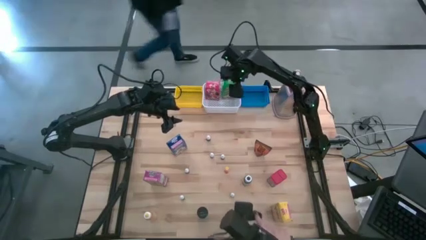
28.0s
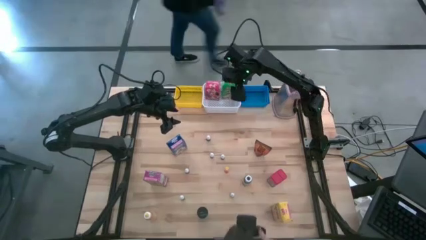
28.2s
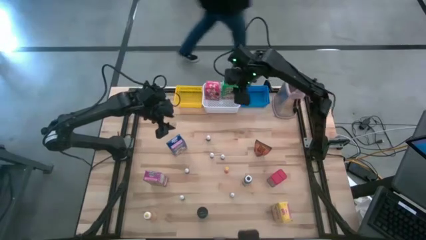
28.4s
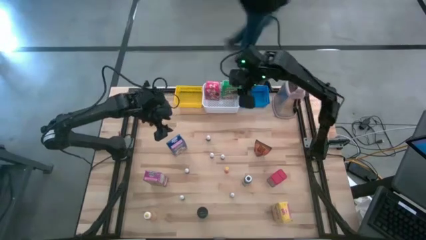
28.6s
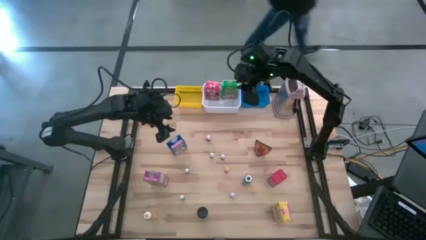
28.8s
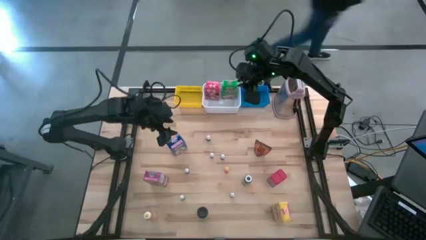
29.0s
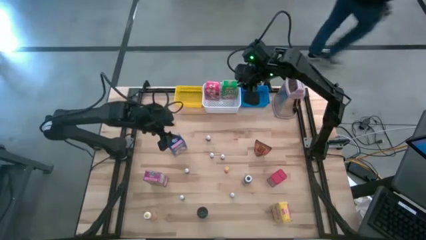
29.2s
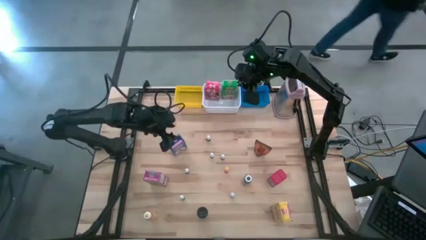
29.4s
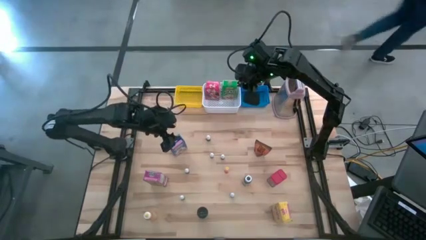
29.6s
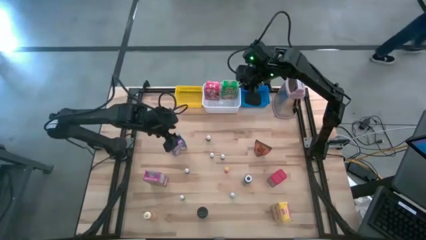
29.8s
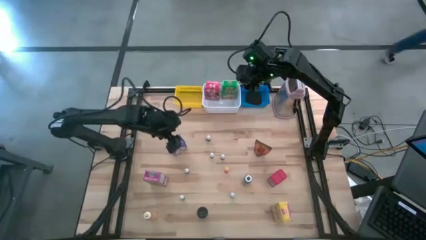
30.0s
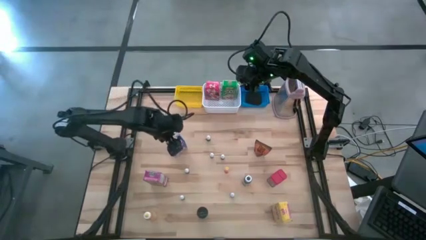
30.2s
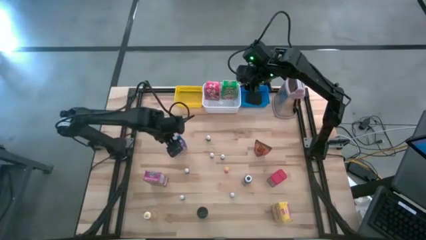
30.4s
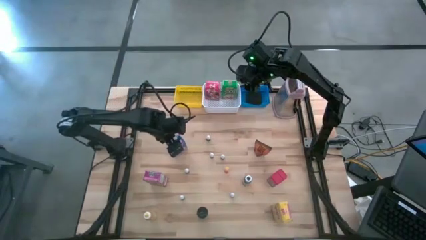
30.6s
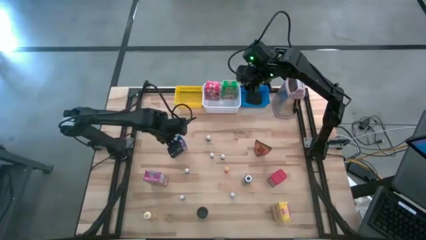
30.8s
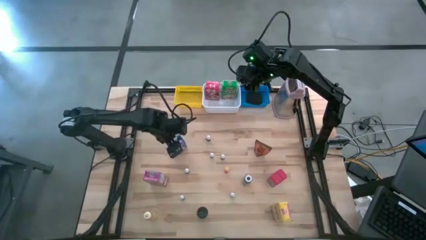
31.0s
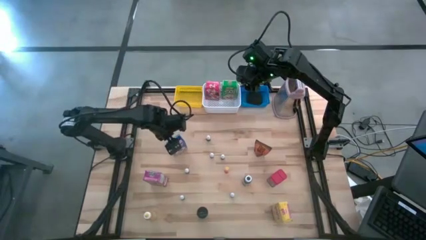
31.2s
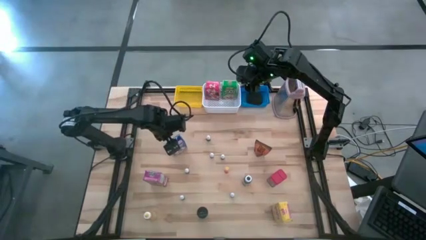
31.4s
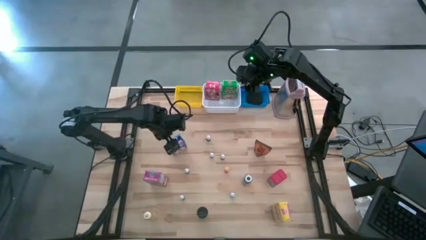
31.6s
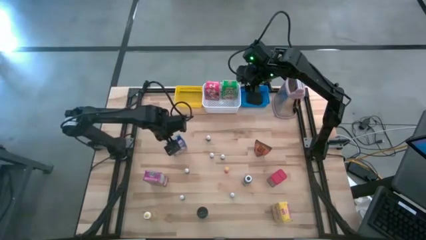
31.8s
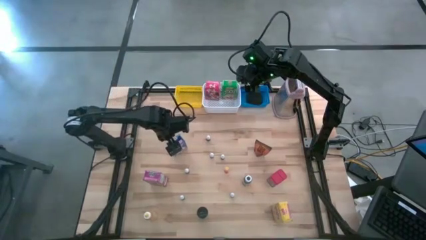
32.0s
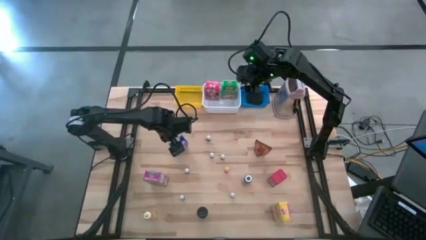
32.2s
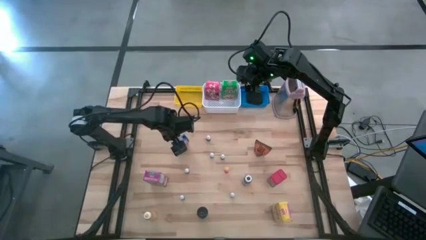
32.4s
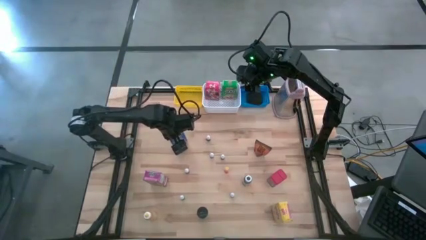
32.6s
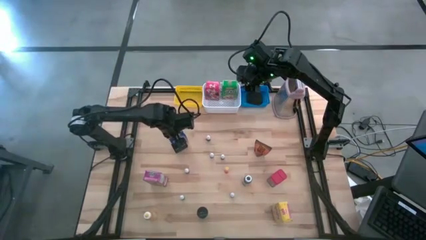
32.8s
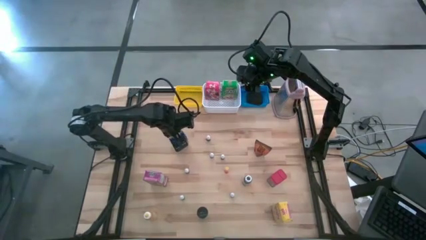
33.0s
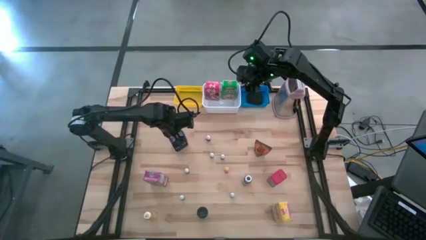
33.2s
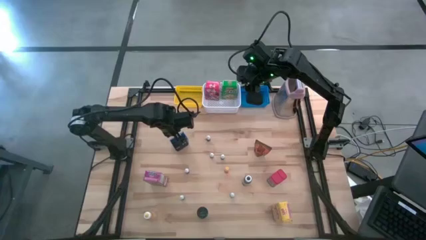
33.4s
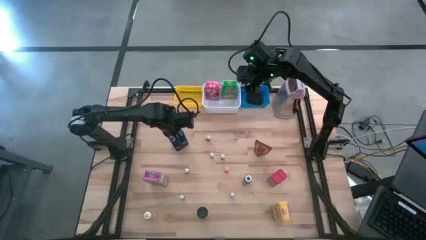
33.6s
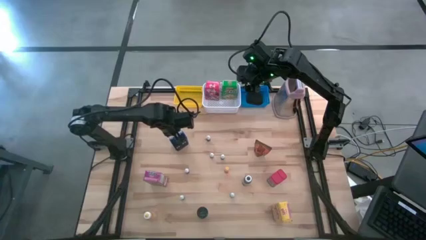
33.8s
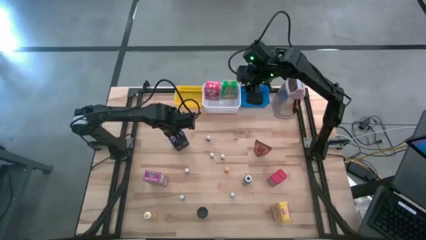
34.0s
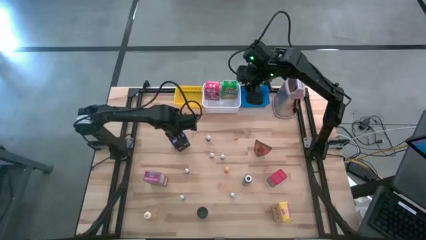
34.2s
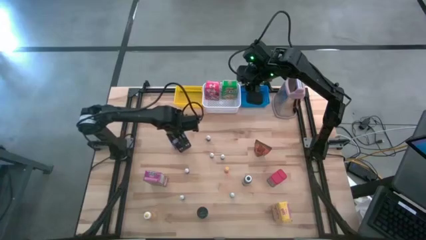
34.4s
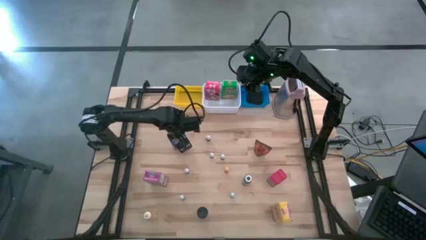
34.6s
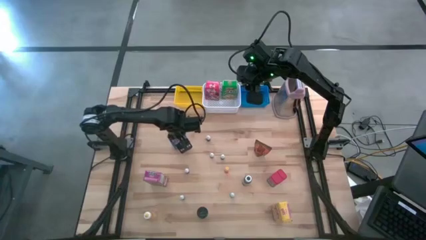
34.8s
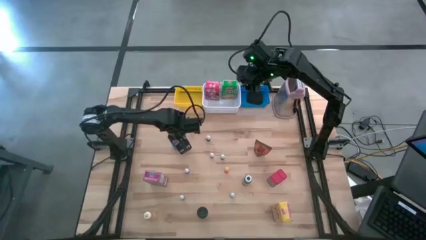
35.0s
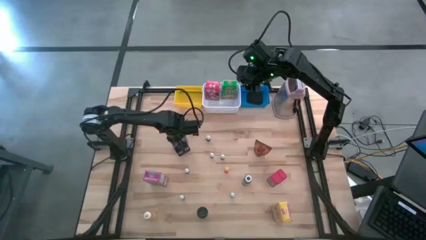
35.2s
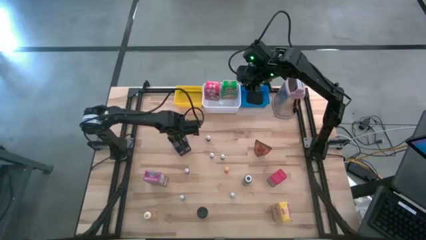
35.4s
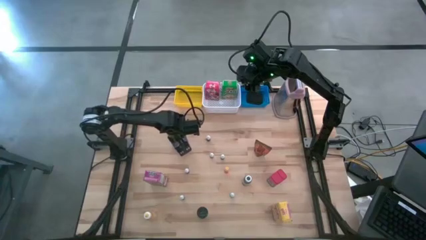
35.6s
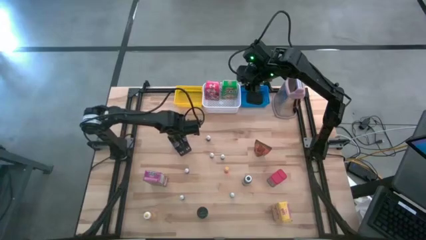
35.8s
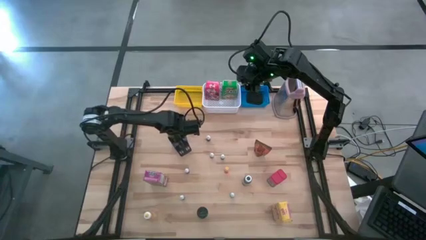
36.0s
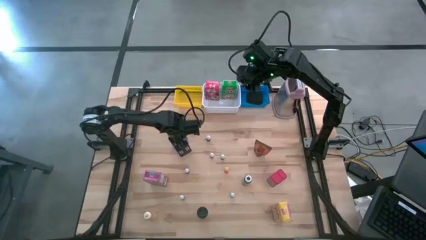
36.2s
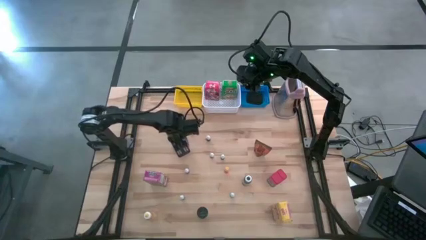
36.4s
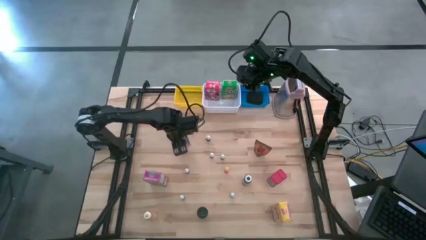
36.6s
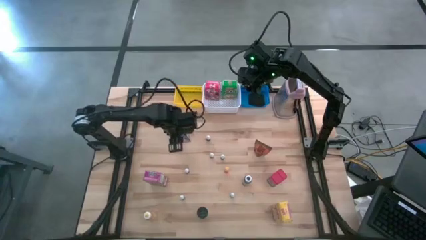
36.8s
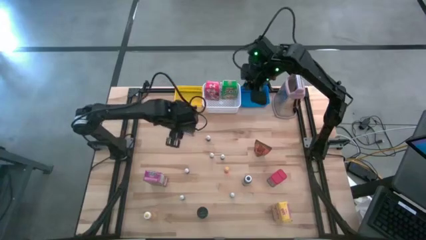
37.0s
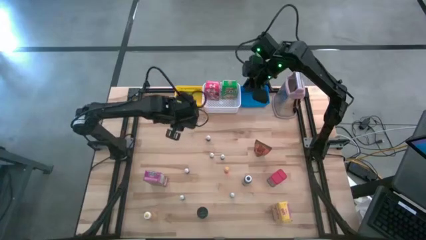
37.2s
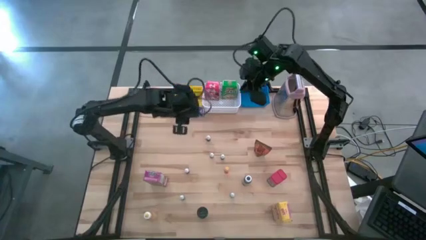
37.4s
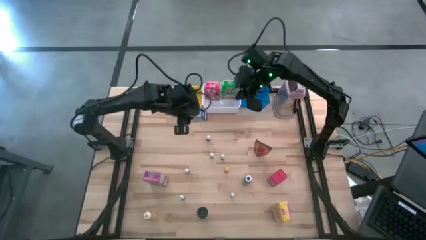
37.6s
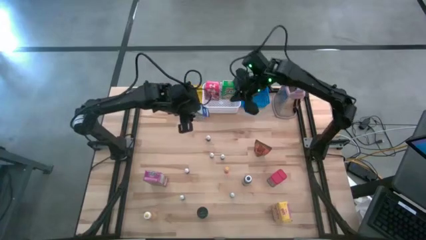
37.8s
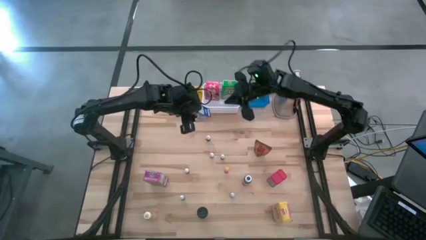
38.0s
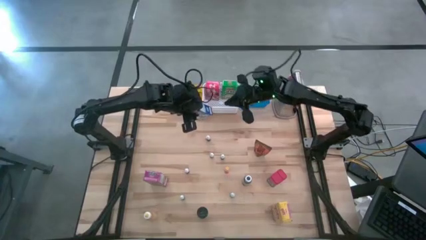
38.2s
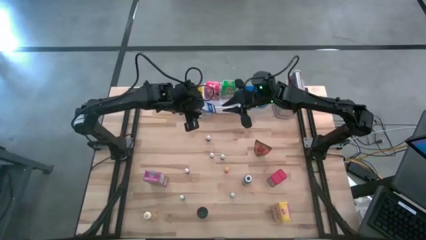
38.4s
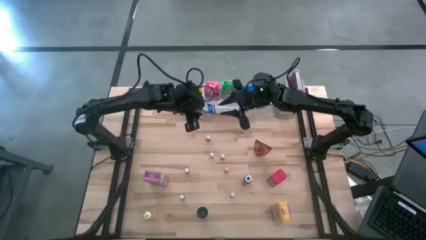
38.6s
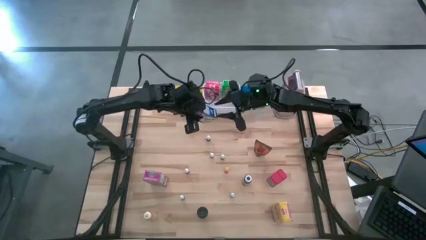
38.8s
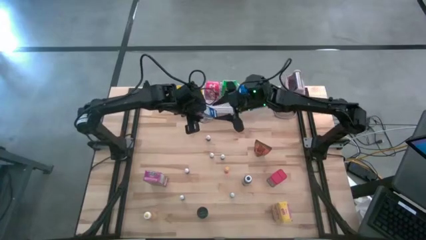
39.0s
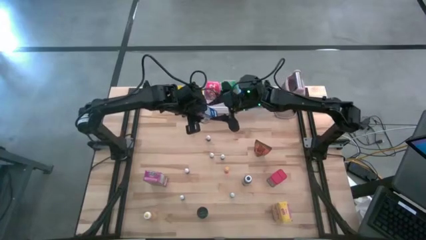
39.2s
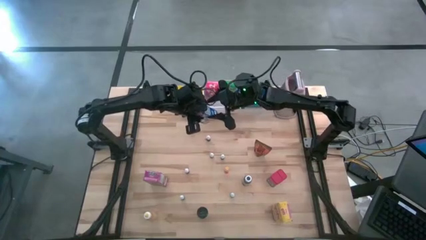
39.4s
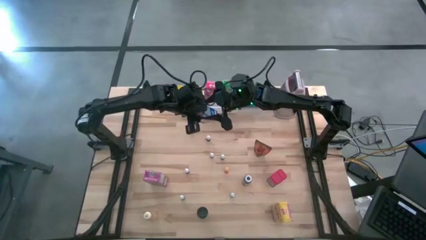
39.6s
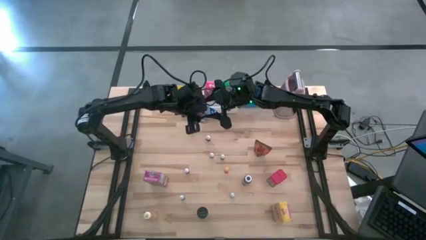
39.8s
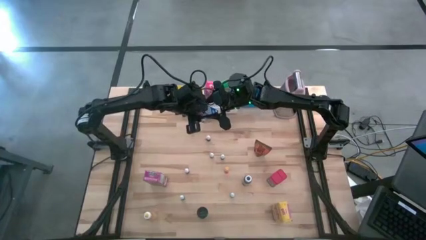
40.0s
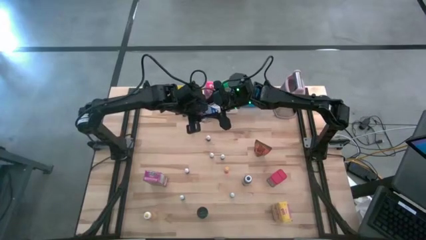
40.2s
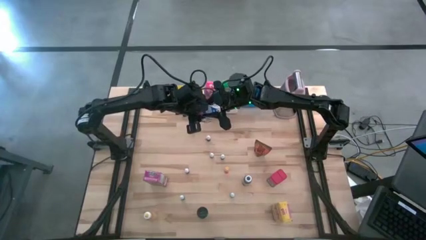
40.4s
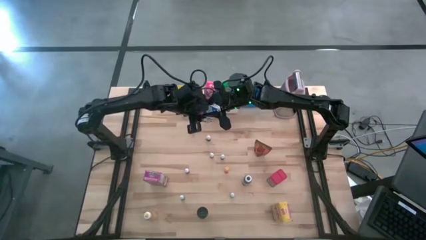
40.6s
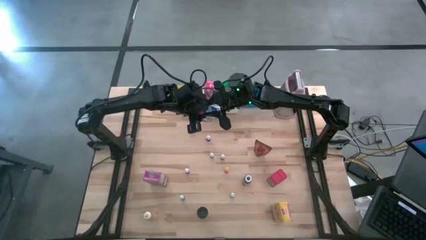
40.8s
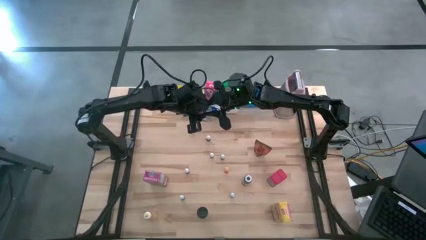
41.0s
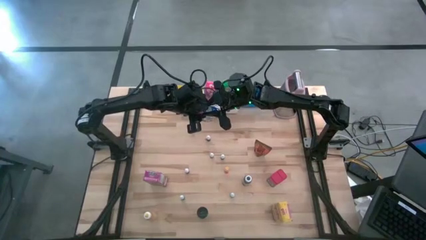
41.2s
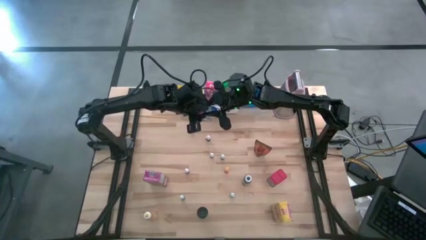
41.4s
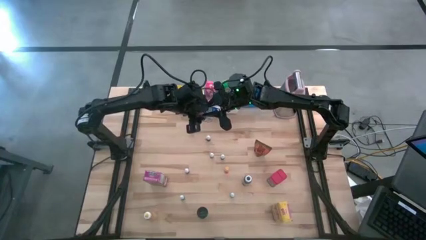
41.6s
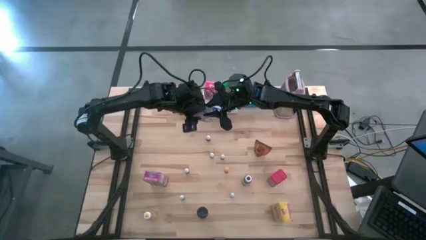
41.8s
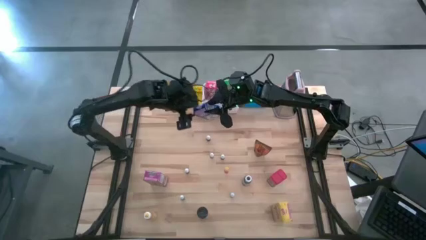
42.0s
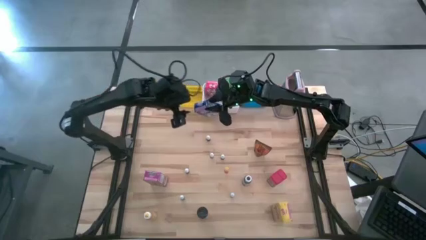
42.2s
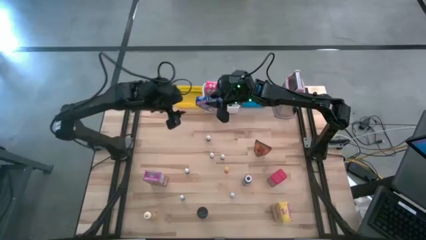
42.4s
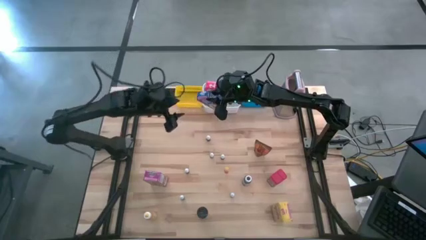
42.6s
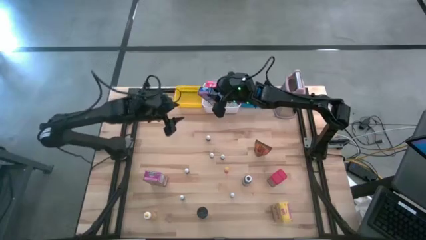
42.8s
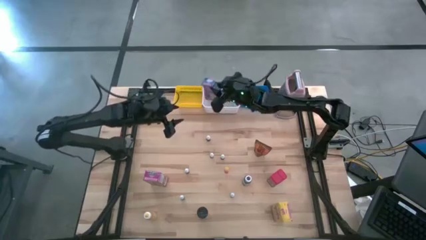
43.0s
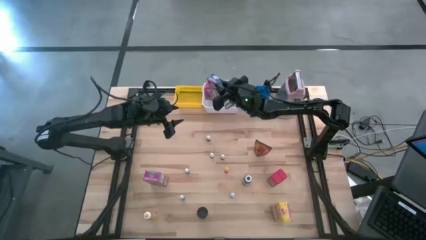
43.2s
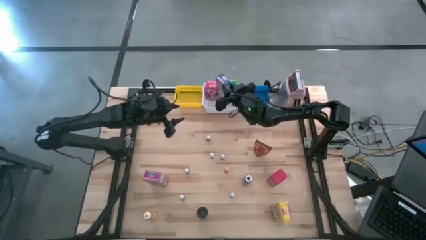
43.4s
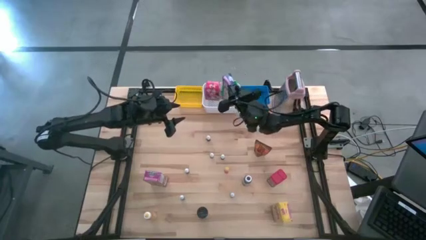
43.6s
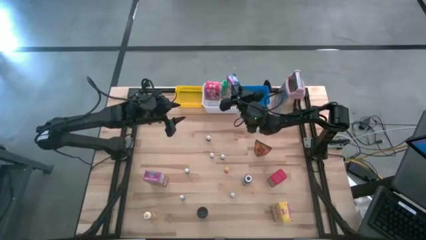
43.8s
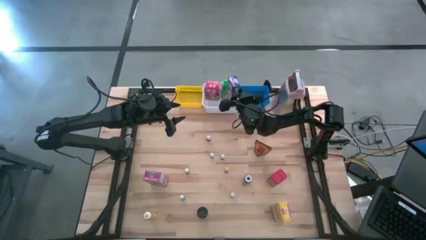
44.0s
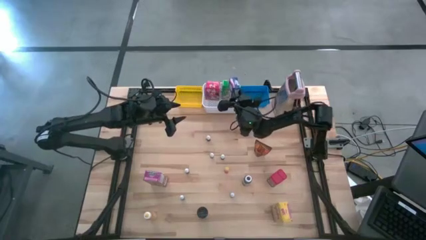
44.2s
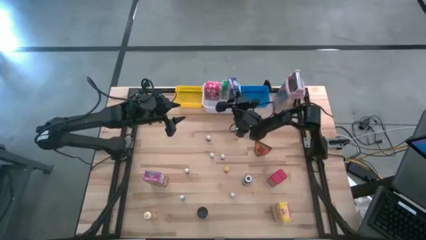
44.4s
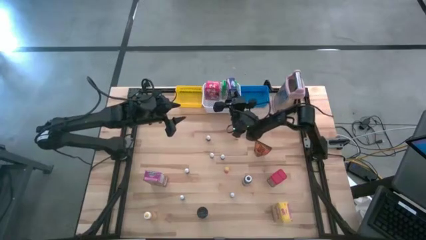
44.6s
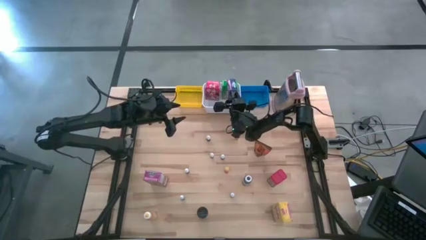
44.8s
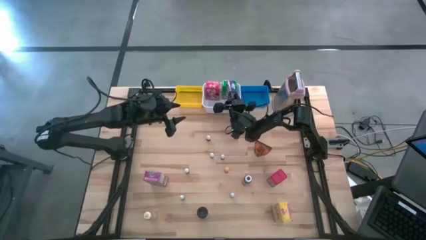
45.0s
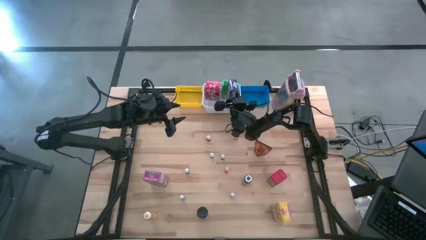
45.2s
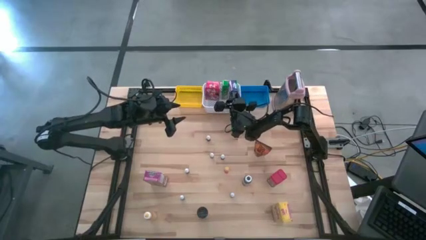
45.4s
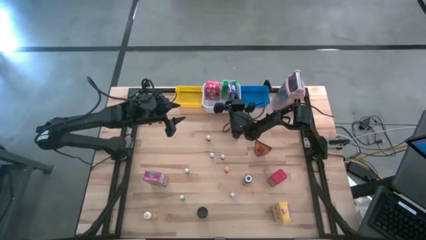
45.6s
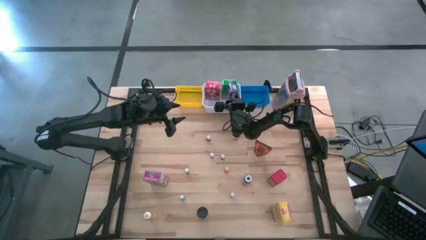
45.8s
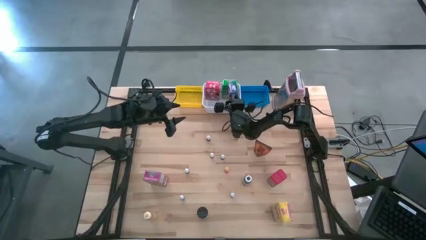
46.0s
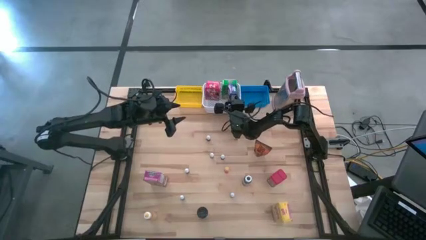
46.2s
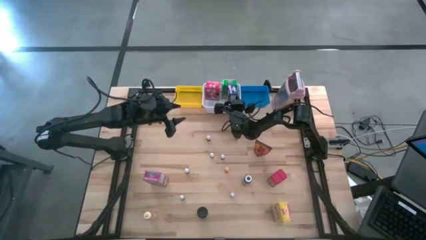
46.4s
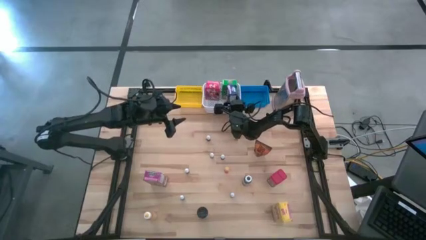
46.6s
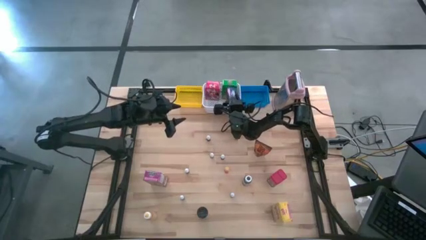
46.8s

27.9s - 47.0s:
Task: Pick & Place Kitchen Items
Put the blue cereal box into the white basket
